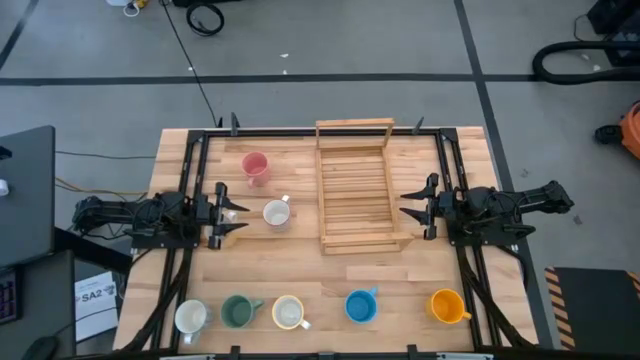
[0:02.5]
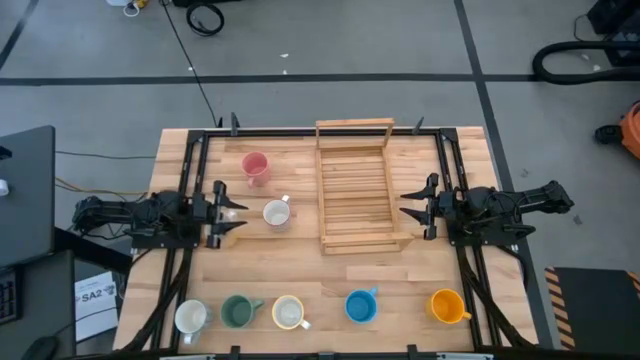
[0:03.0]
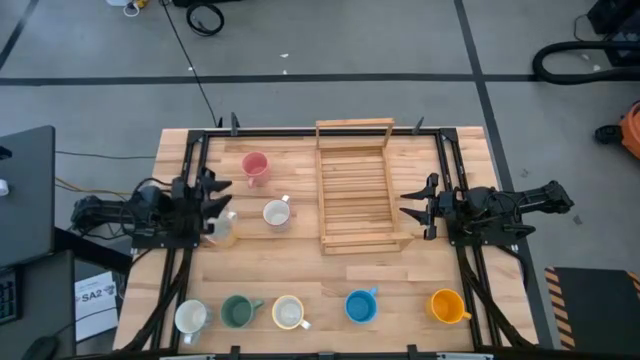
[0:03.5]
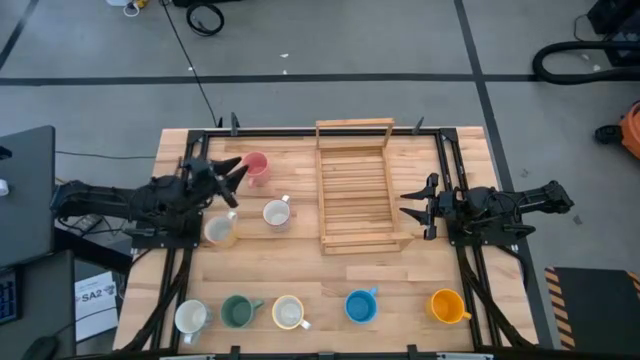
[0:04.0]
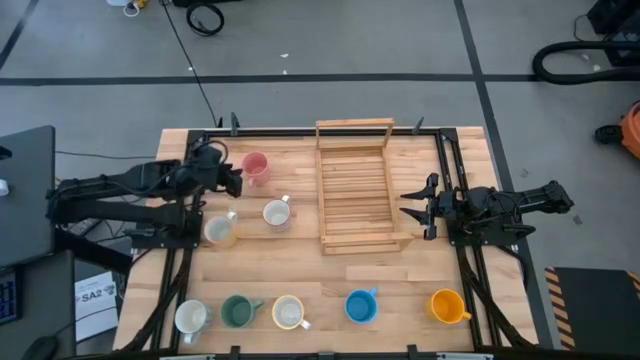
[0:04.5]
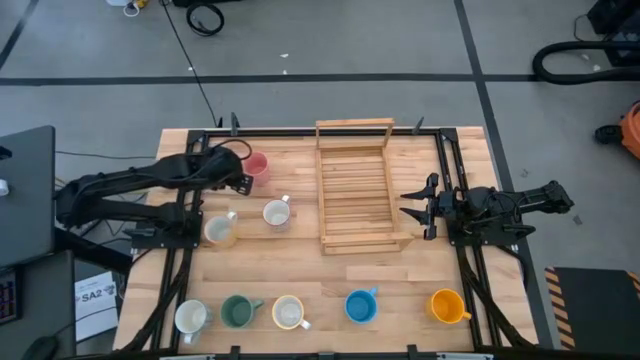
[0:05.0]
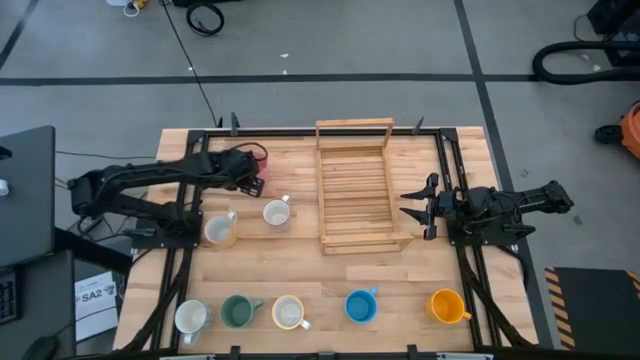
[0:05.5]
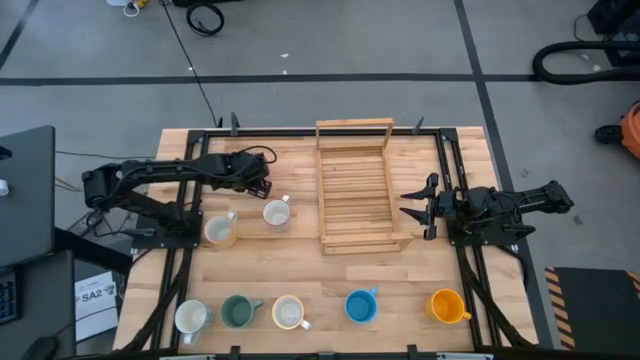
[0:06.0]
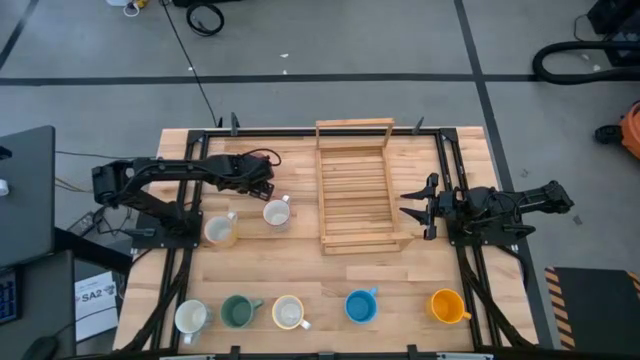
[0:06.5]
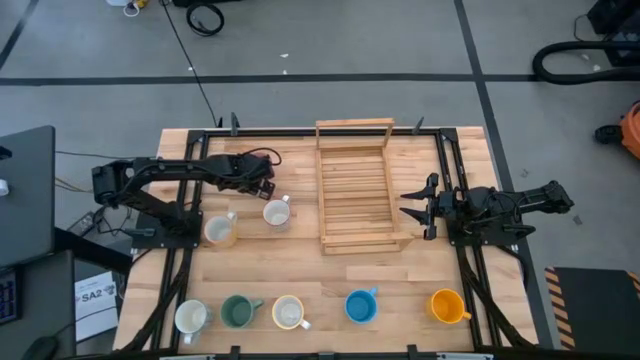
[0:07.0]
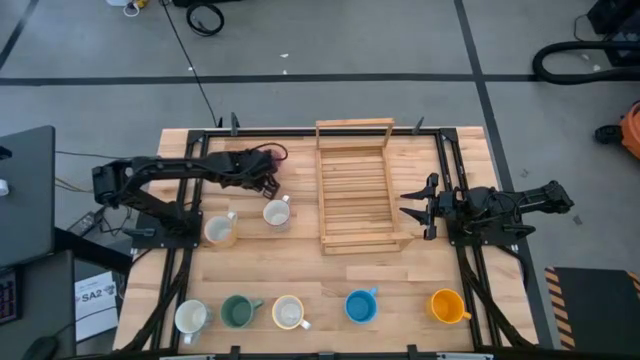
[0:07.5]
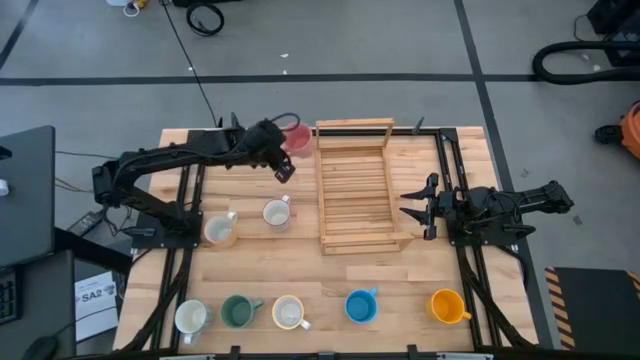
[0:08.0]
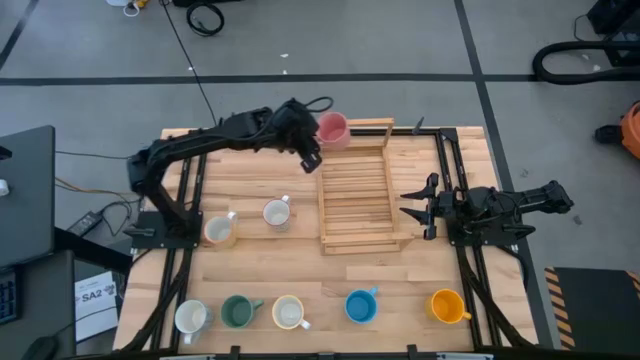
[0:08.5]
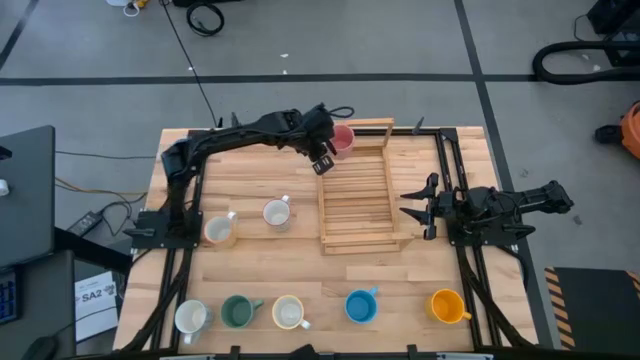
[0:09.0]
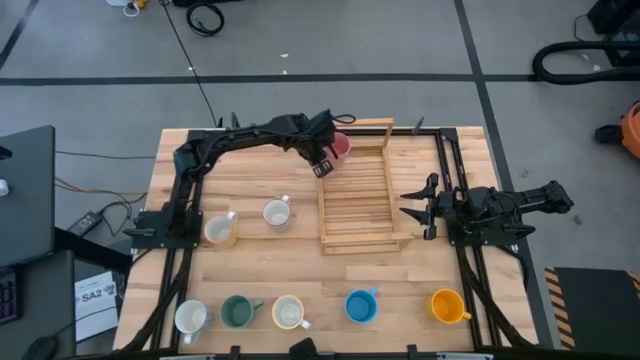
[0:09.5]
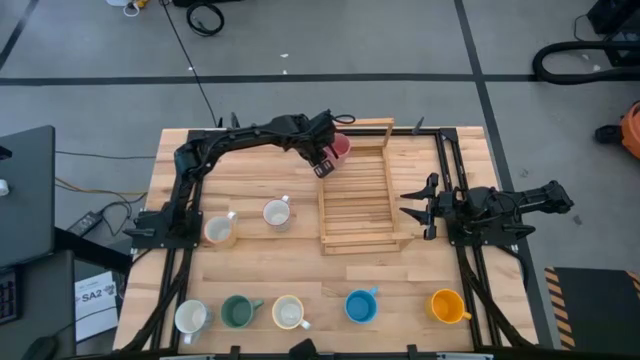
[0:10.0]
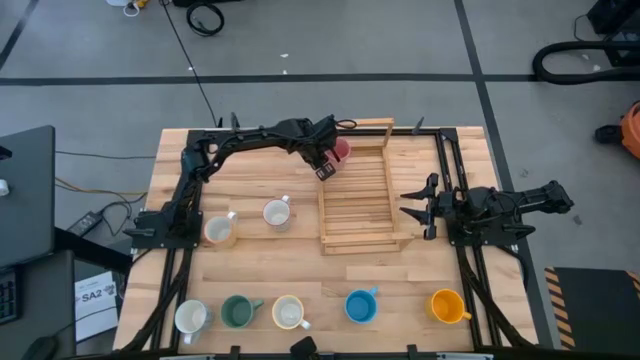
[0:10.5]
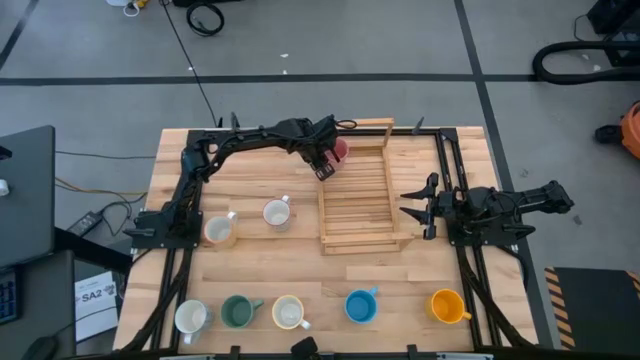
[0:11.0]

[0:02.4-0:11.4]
Task: Place coffee mugs
Put the pink mug on the shelf

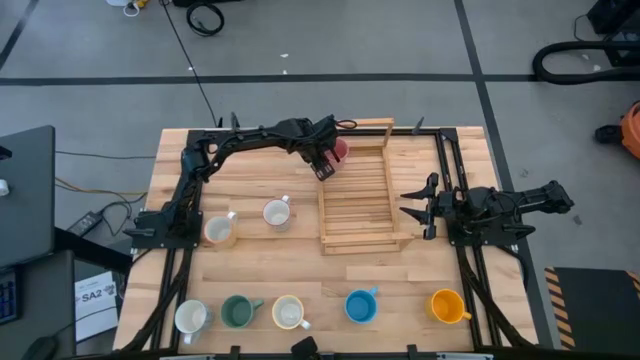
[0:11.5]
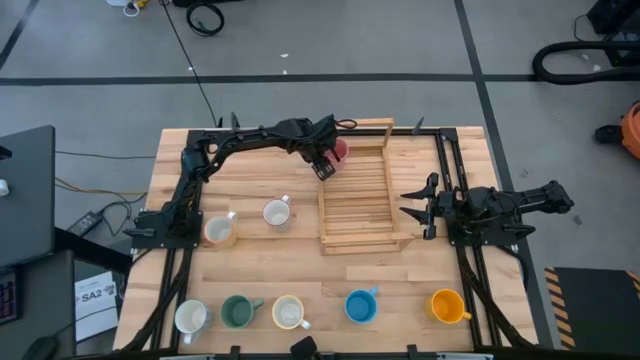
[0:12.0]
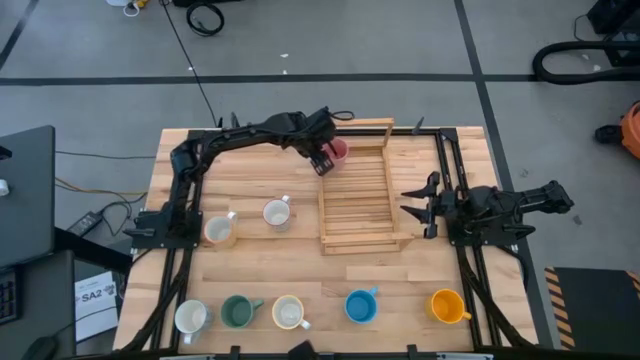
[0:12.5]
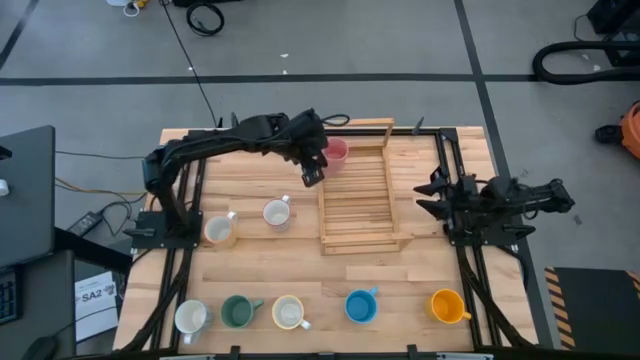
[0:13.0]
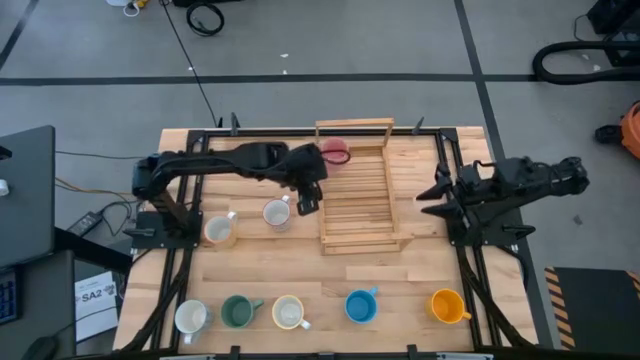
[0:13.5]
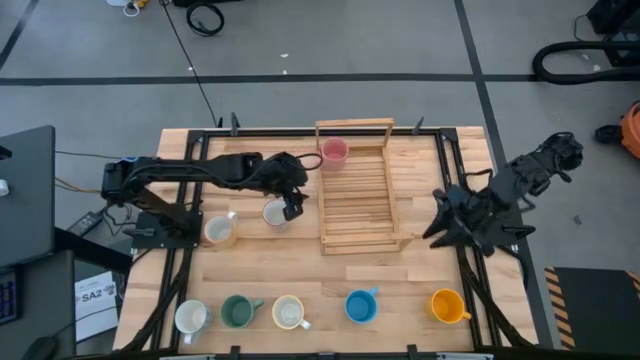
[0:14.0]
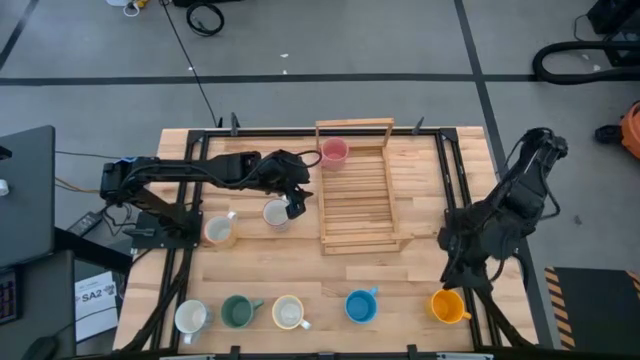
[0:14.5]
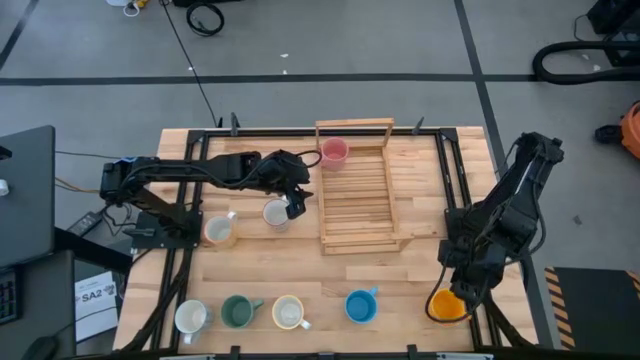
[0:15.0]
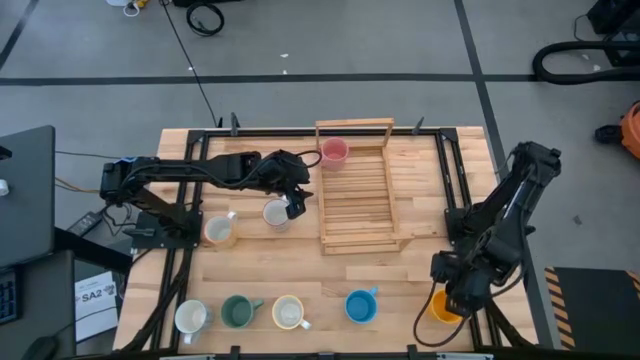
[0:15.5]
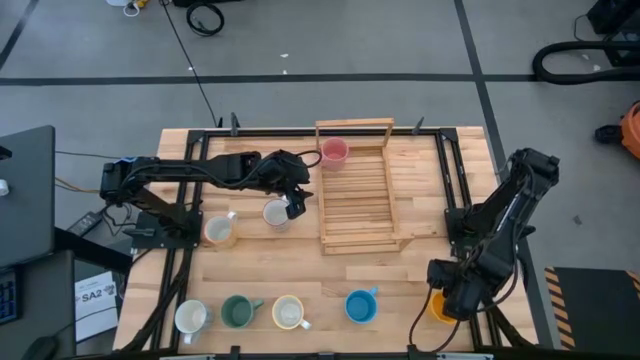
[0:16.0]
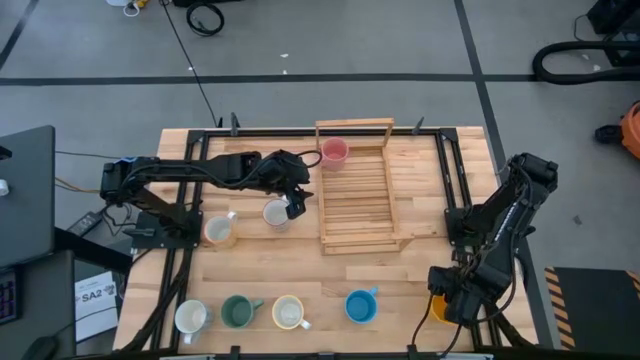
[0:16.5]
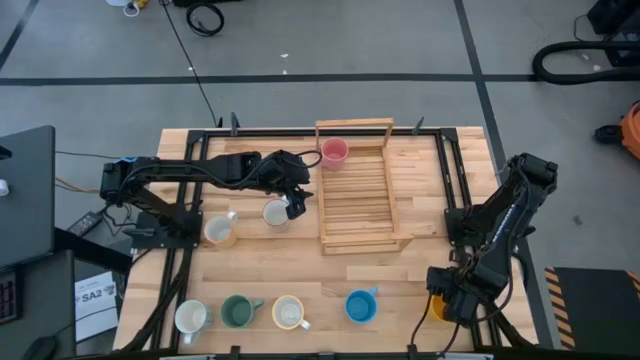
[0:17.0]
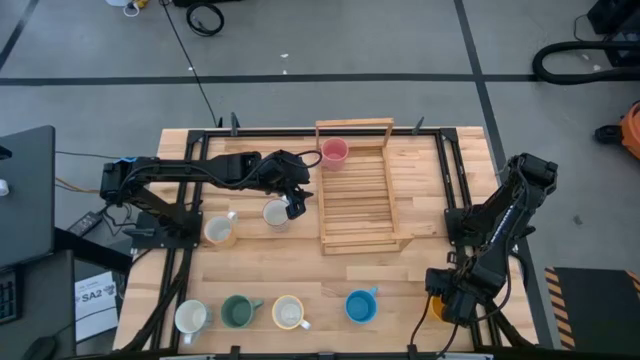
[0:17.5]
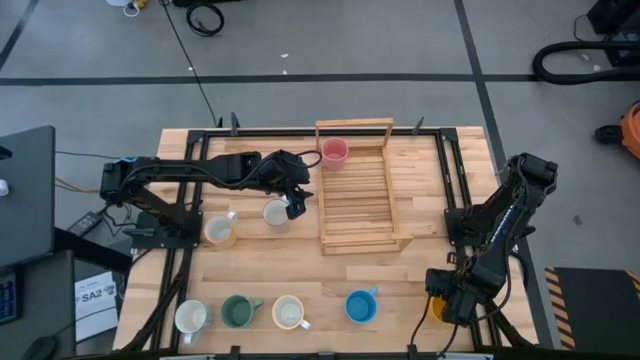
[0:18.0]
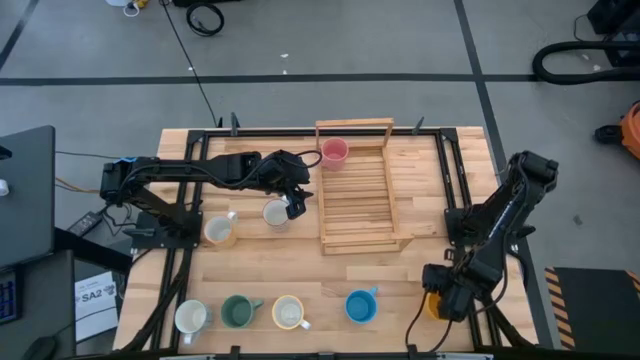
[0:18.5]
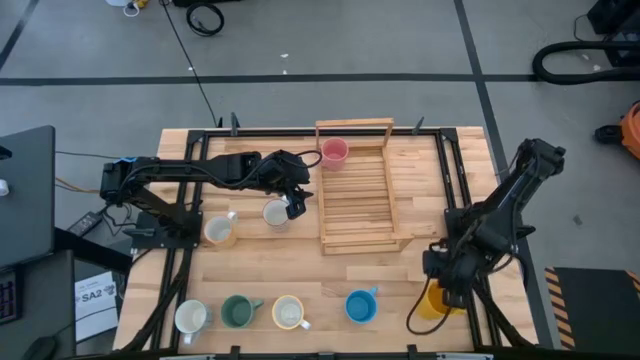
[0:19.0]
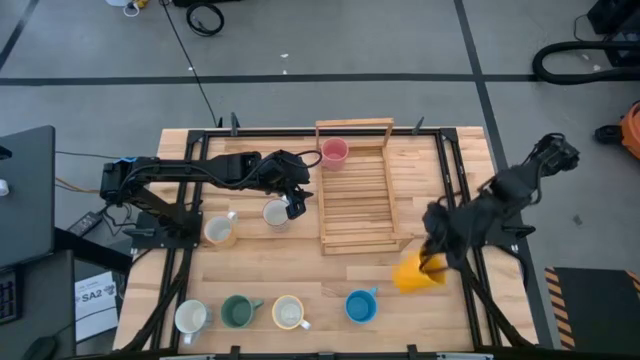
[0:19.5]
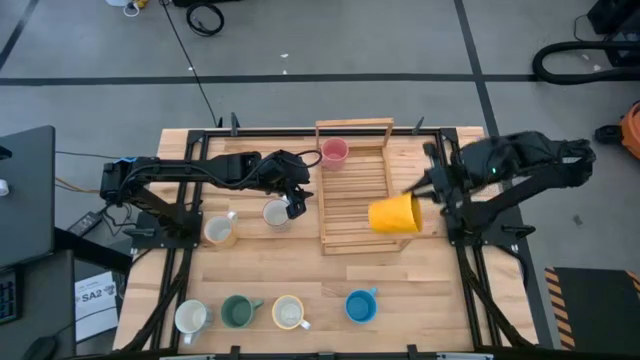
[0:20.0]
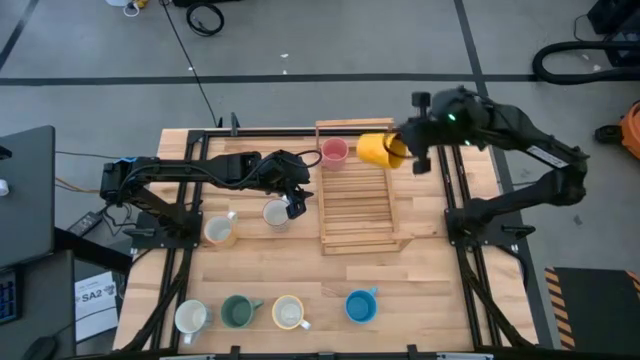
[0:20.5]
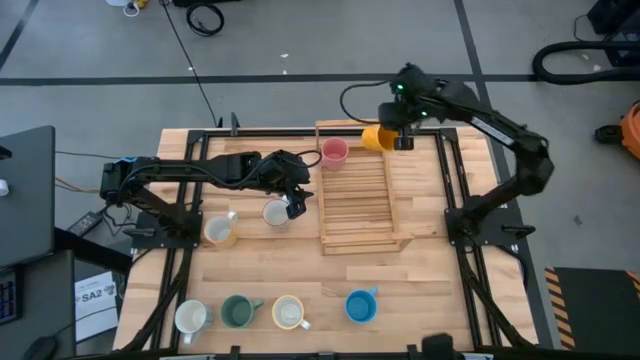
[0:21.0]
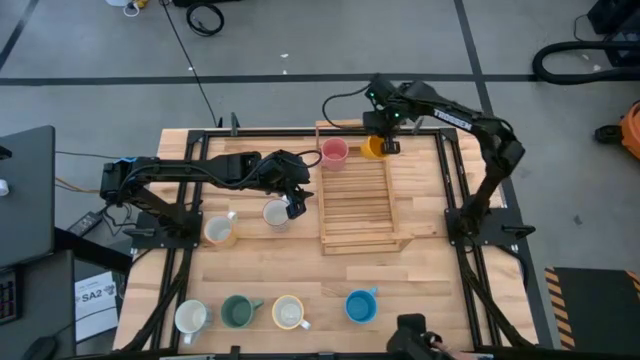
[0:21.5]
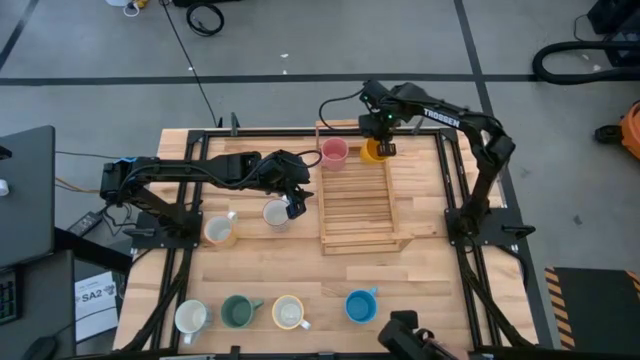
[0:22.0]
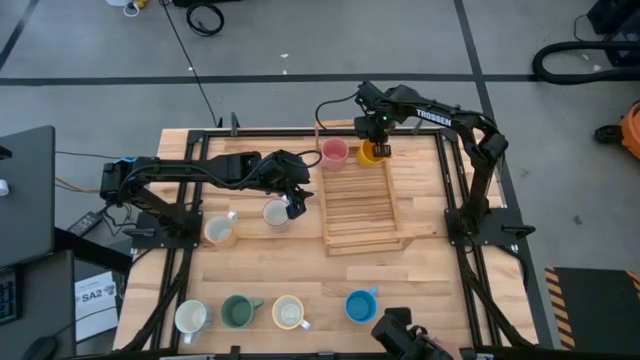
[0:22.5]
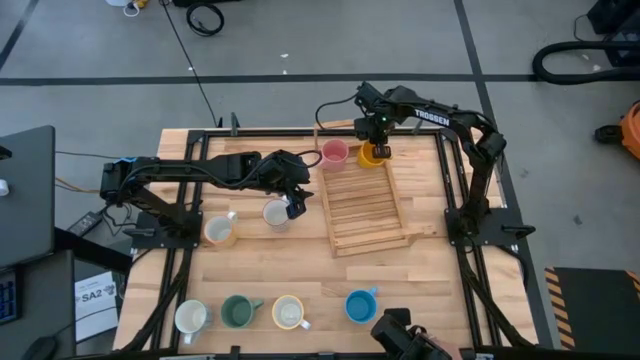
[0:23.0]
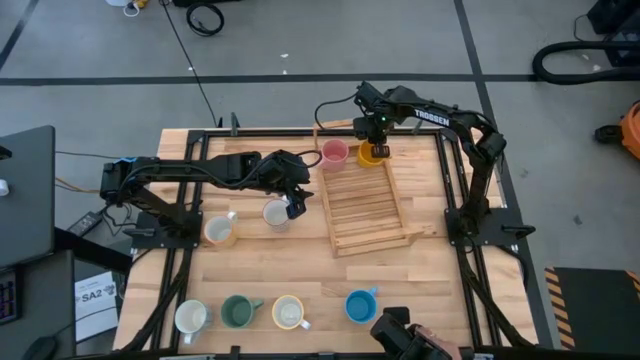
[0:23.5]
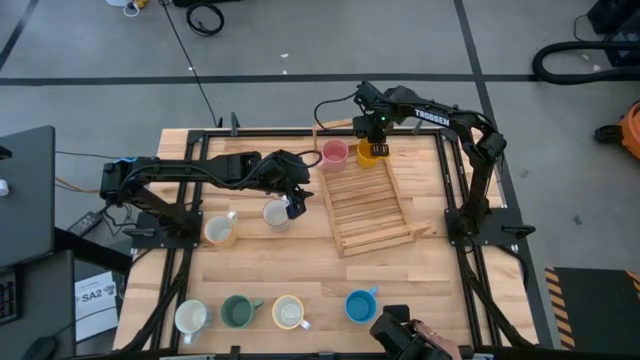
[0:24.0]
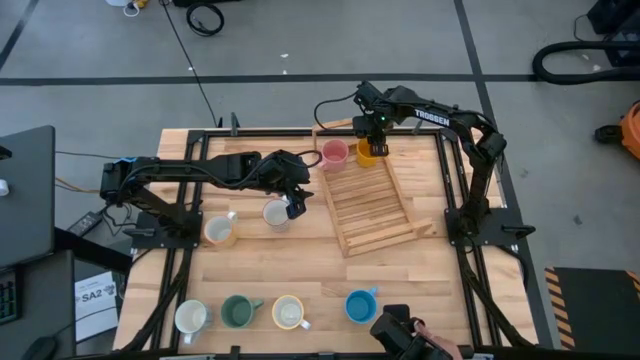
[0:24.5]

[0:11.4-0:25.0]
Put the yellow mug on the shelf
